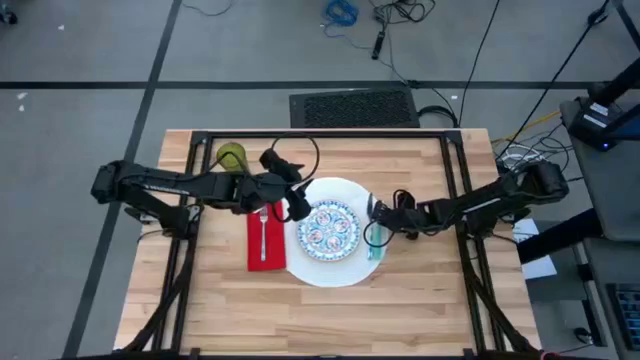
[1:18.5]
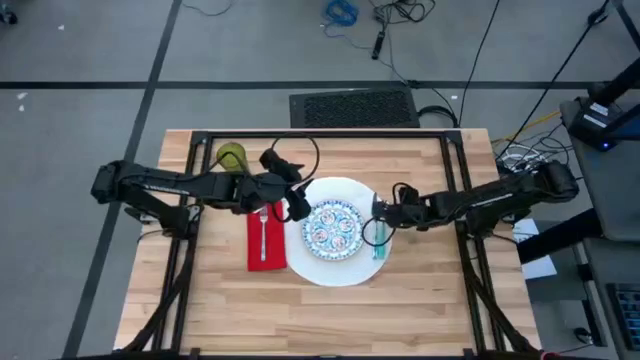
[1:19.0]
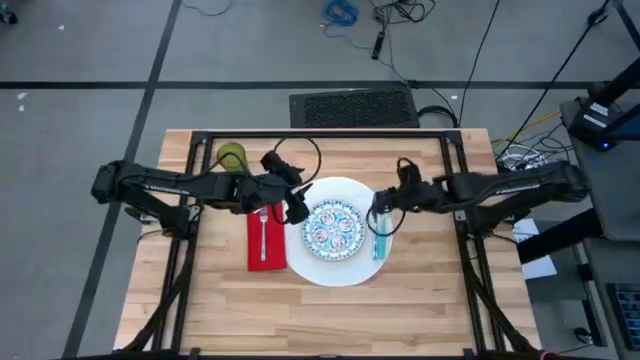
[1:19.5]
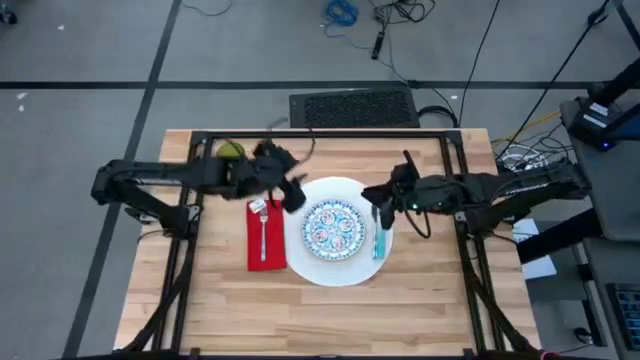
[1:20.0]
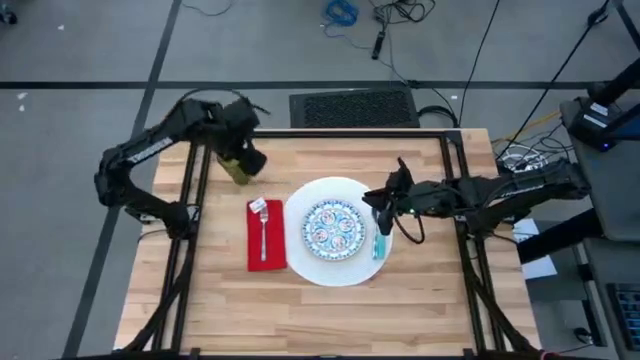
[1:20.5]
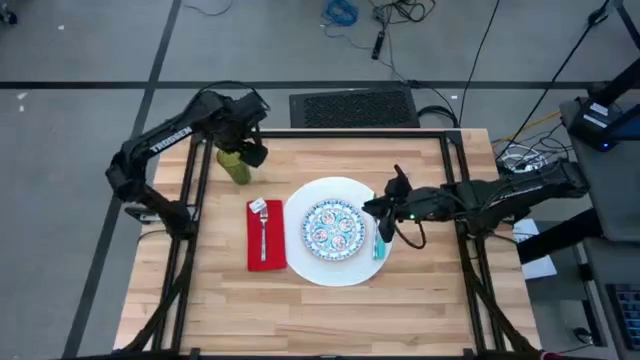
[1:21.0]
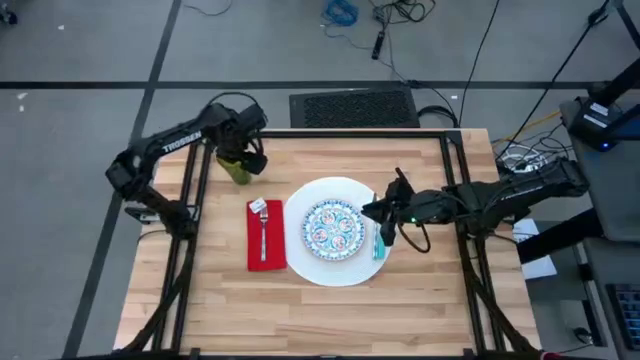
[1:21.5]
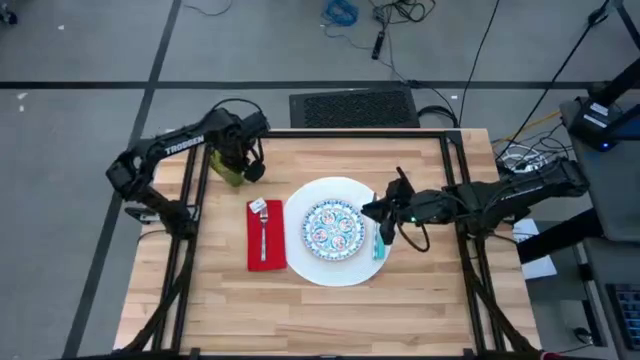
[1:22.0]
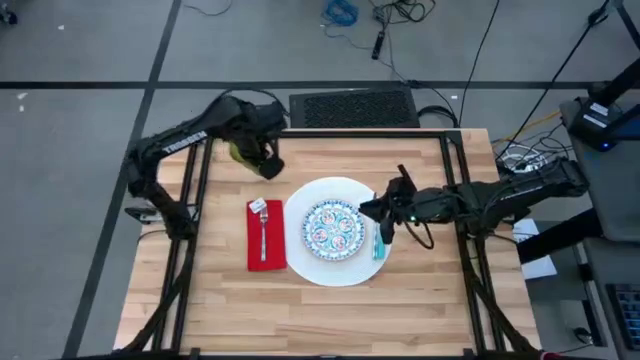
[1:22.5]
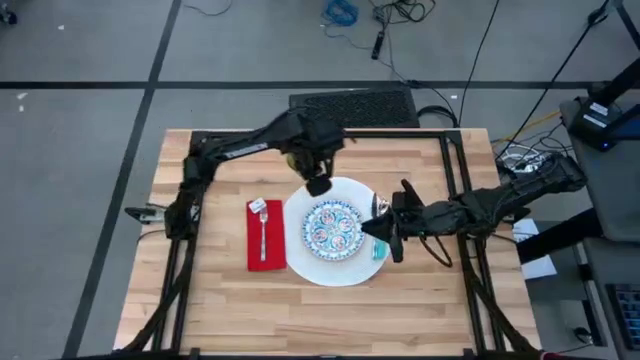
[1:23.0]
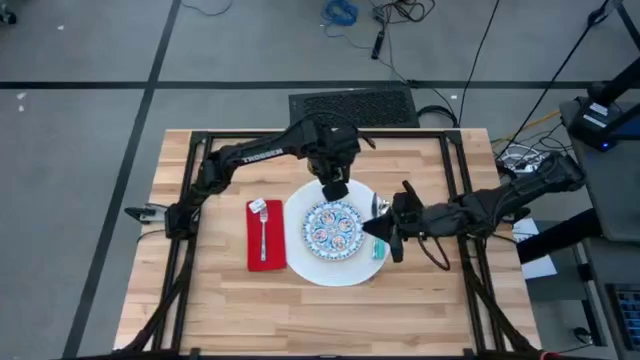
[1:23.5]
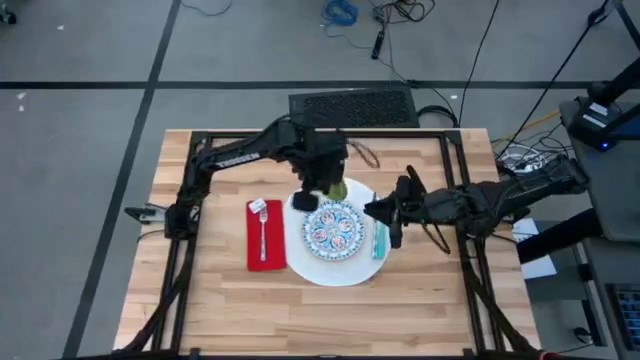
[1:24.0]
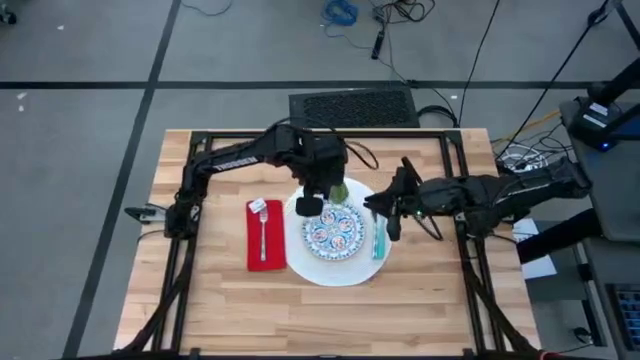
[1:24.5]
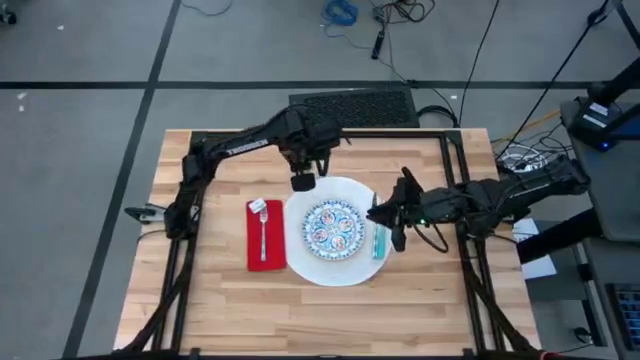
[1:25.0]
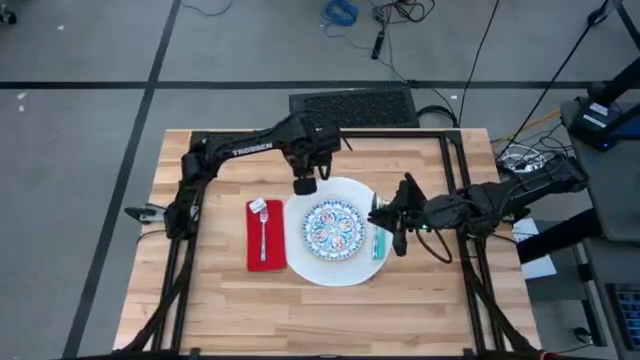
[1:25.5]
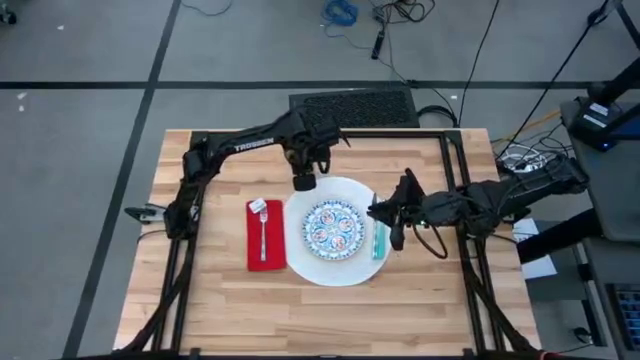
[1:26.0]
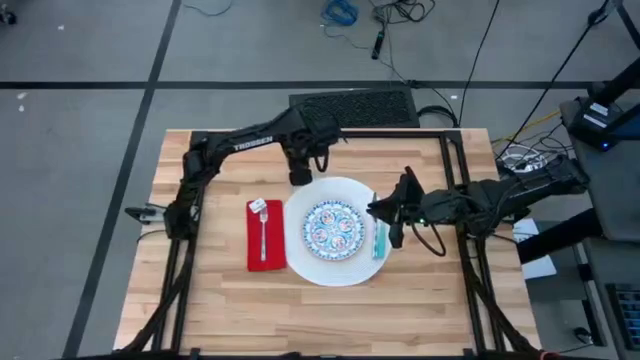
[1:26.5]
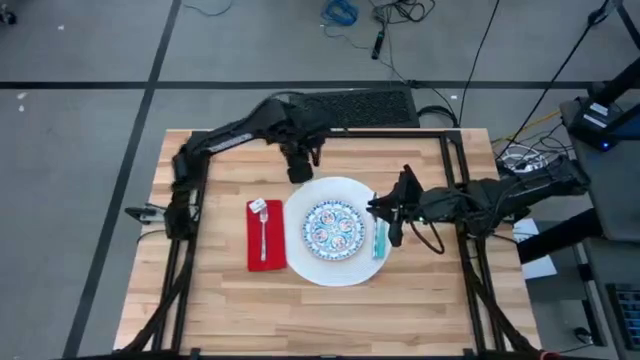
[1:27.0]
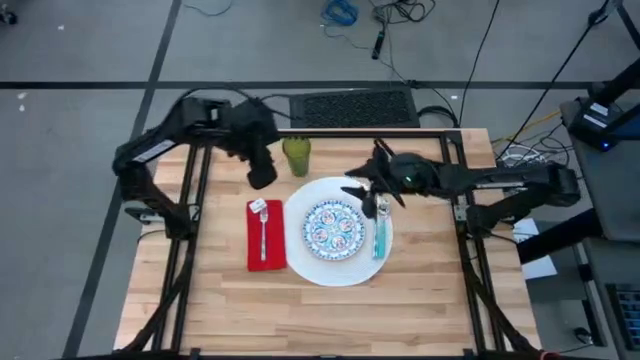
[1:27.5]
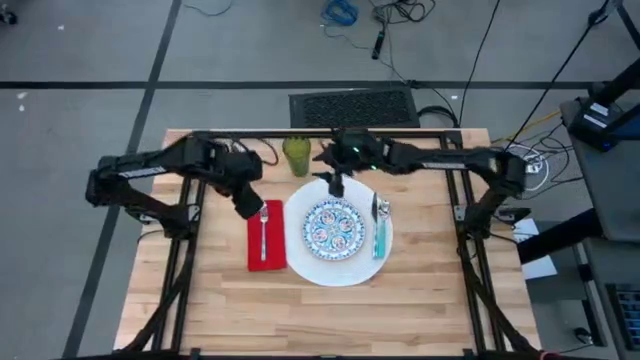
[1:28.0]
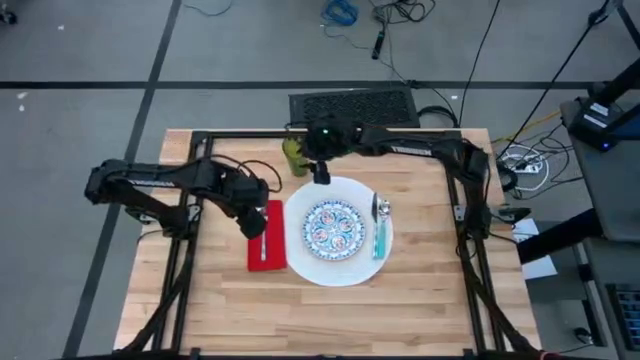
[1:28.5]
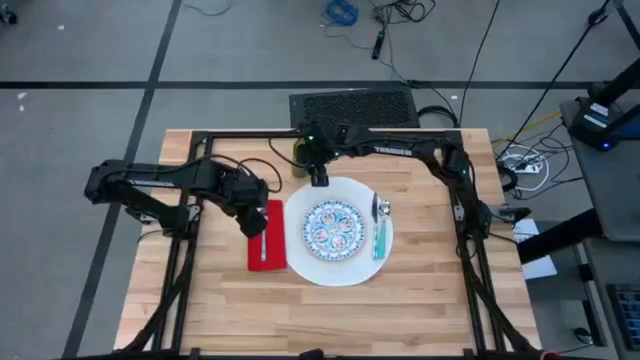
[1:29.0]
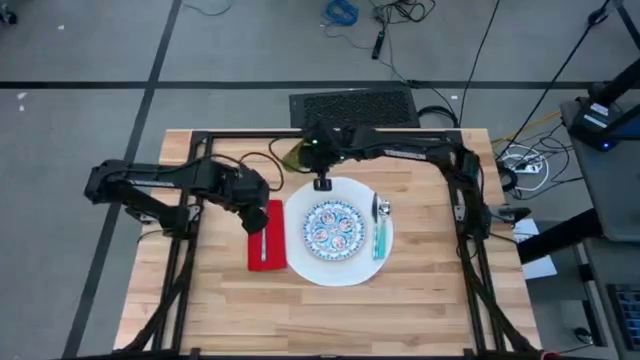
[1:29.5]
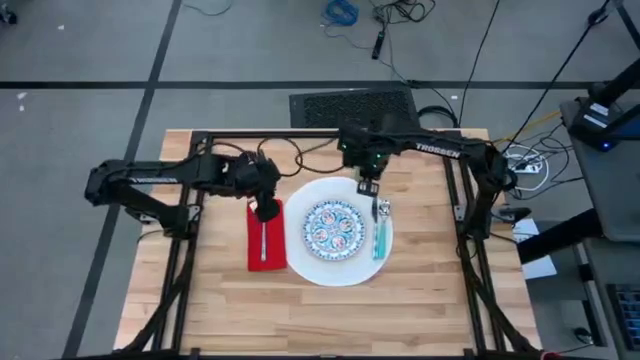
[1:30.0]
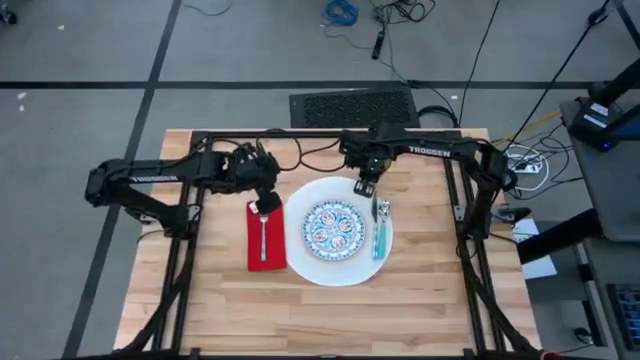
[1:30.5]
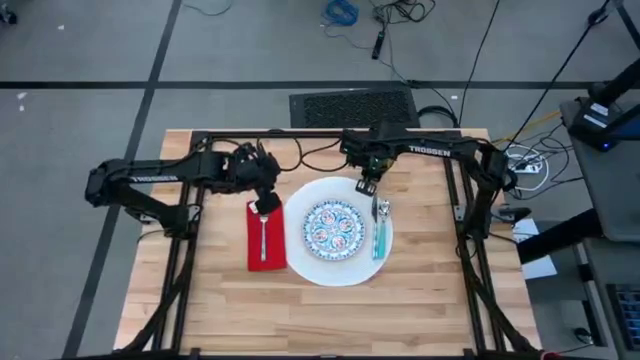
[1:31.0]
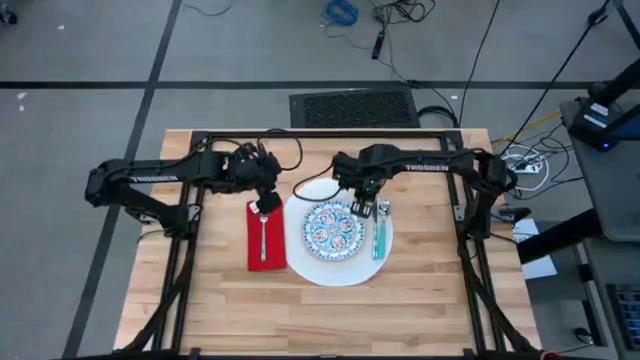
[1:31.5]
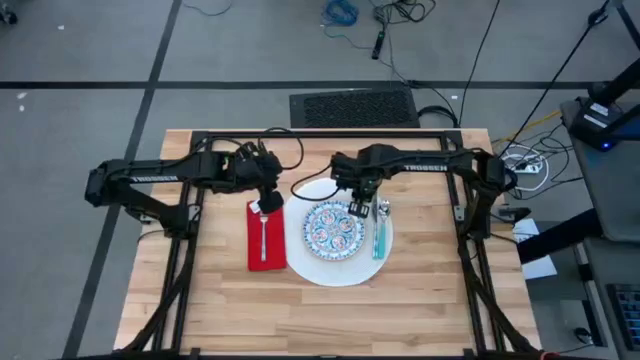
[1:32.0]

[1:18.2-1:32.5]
Task: Set table place
Put the green cup to the top right of the blue patterned plate on the white tablemat

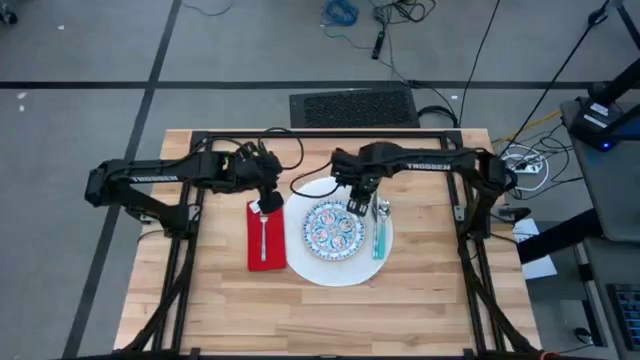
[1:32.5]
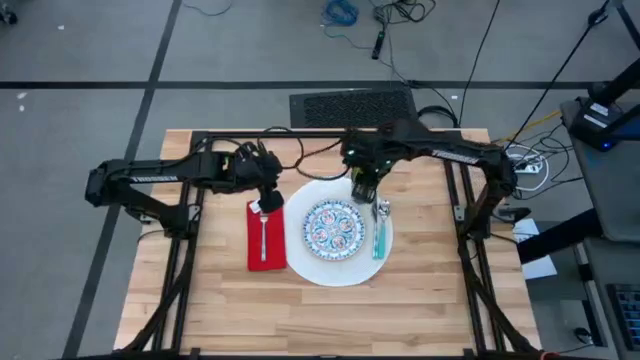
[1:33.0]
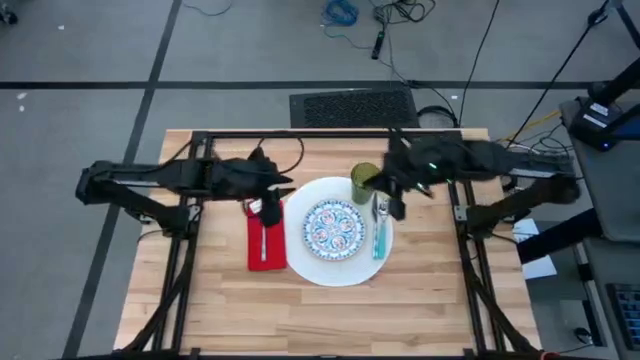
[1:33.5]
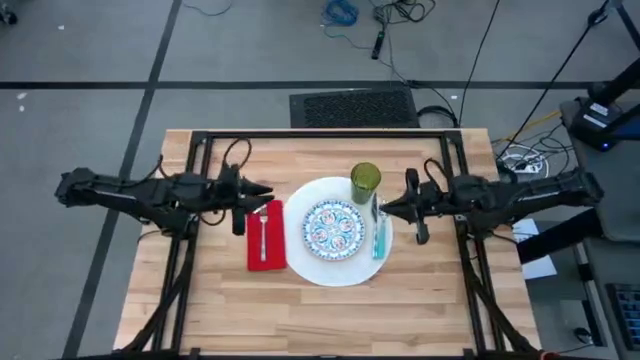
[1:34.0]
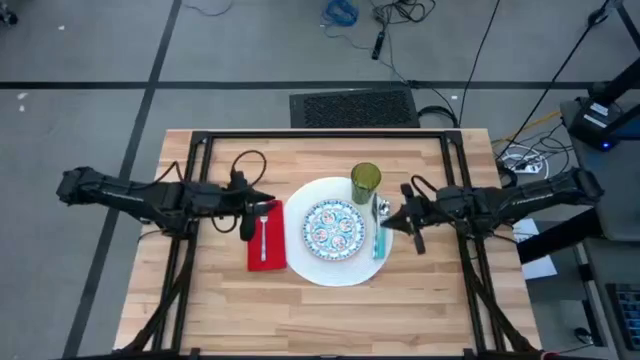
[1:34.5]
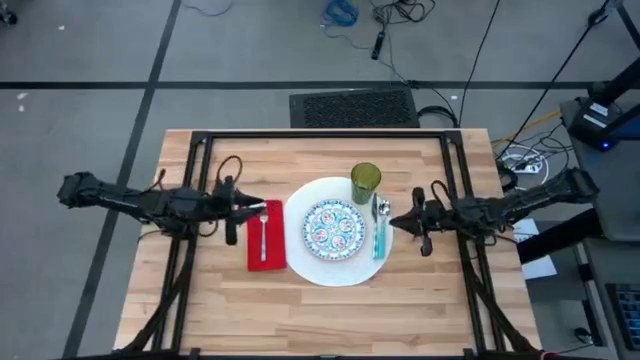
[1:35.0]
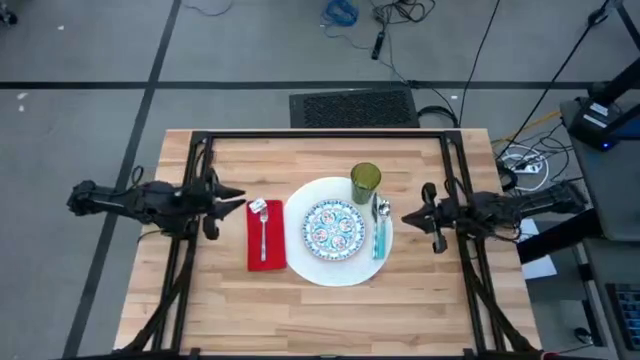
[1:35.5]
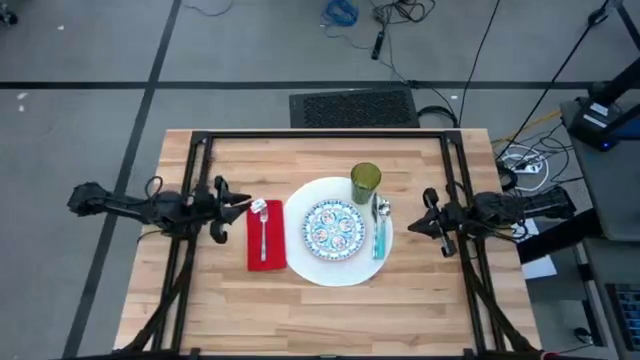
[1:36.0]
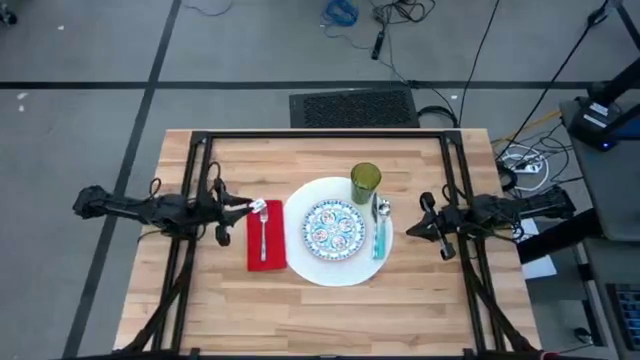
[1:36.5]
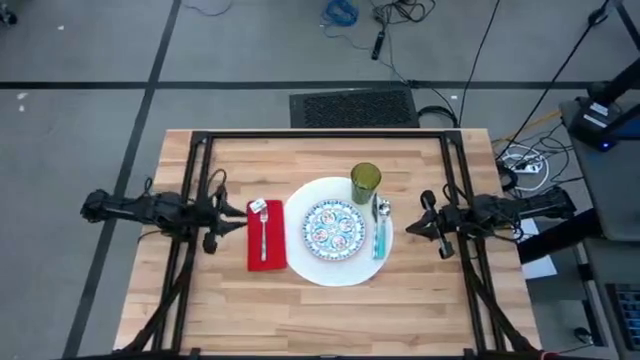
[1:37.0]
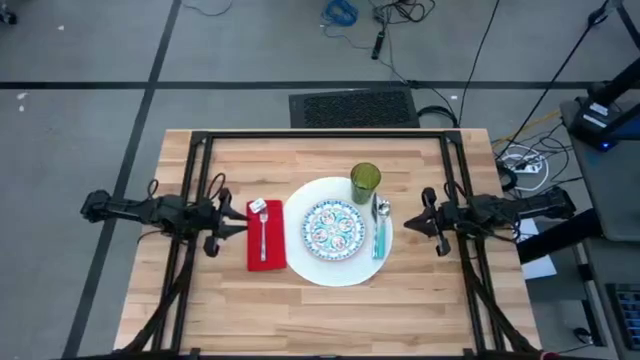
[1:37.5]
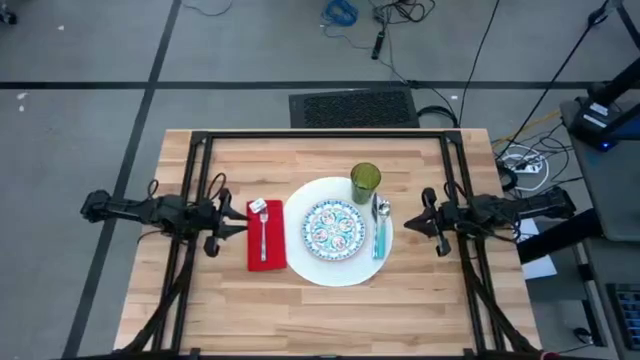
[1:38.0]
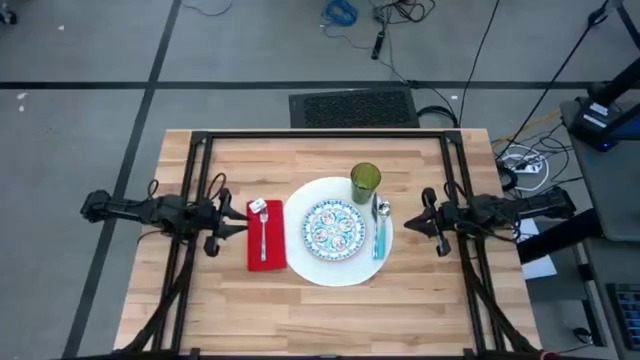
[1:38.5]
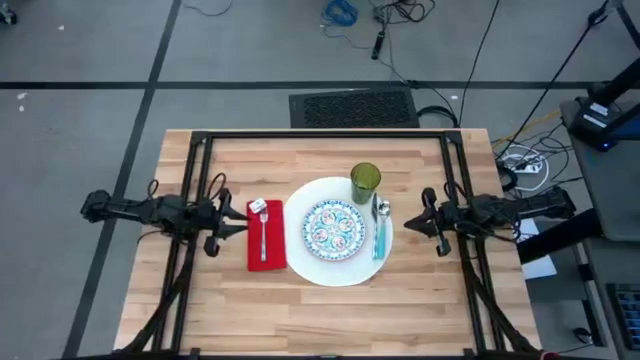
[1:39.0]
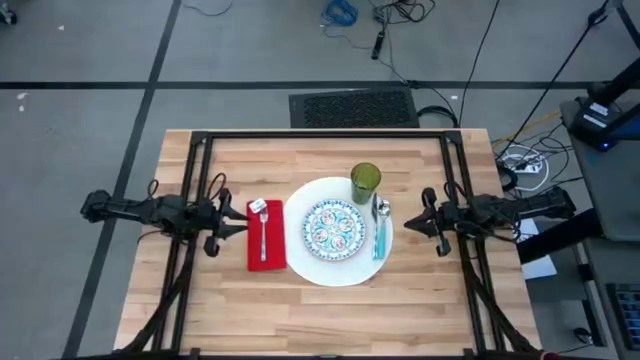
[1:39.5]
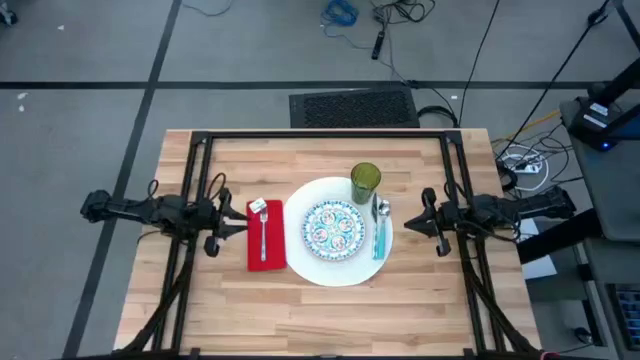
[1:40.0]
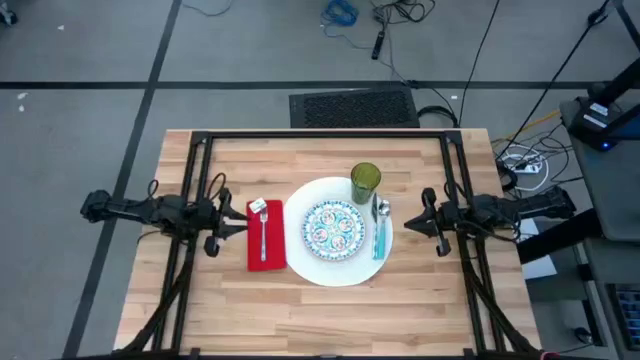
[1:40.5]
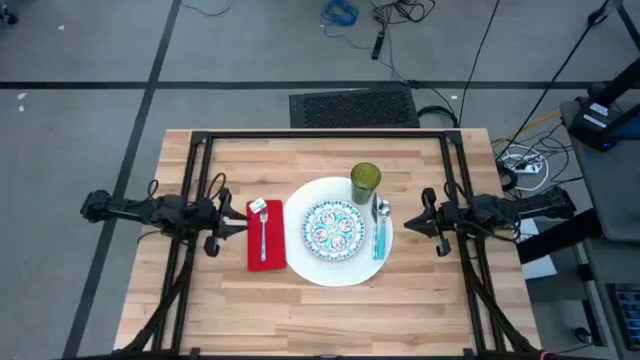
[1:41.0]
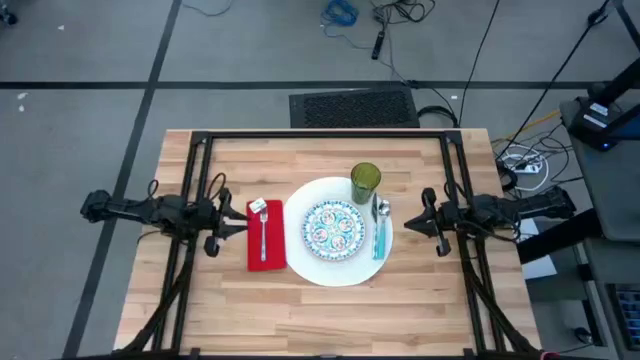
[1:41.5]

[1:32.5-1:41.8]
Return to Home Position
